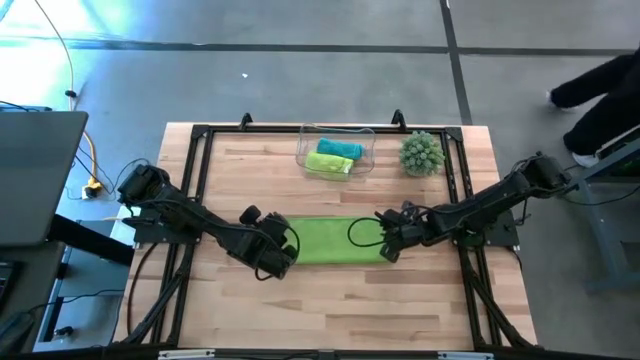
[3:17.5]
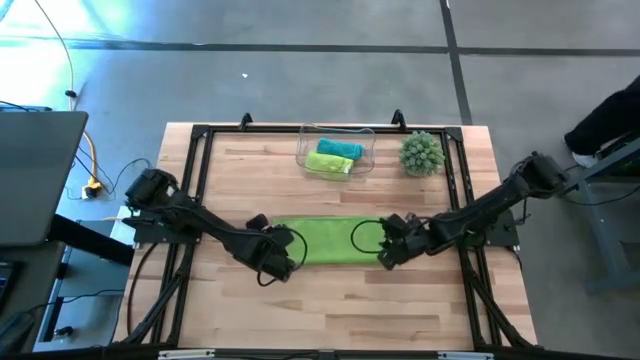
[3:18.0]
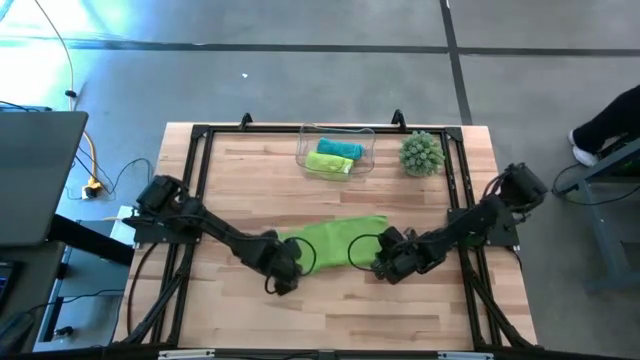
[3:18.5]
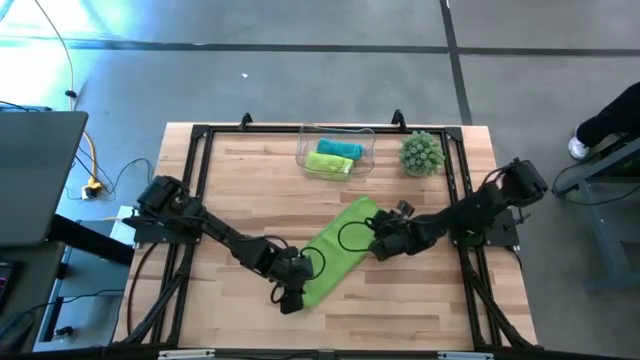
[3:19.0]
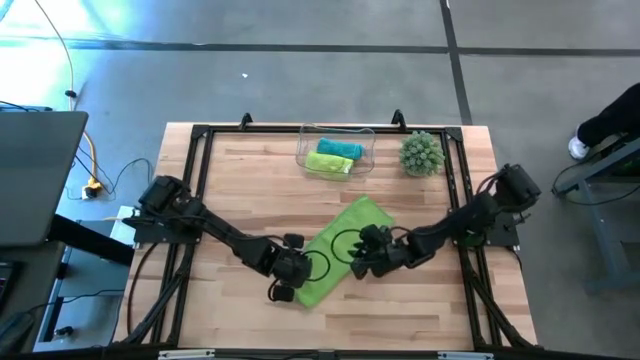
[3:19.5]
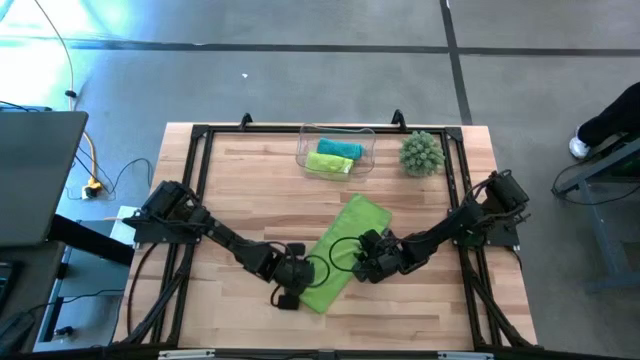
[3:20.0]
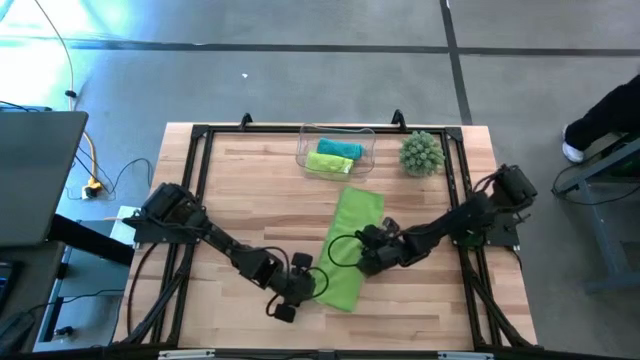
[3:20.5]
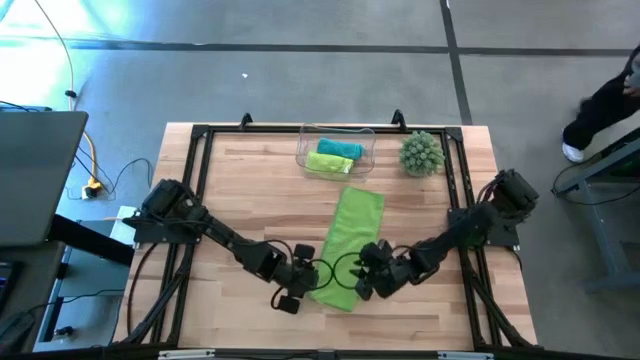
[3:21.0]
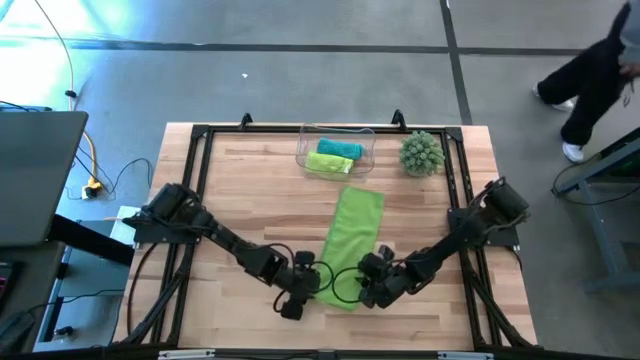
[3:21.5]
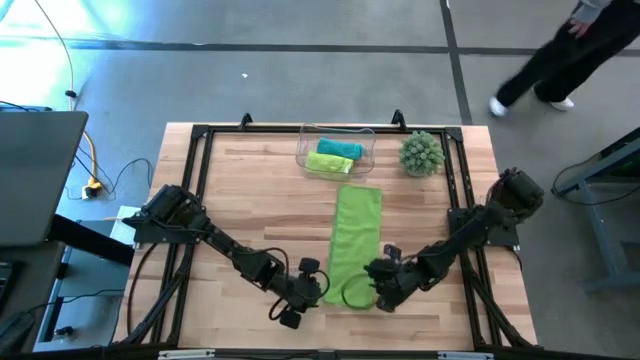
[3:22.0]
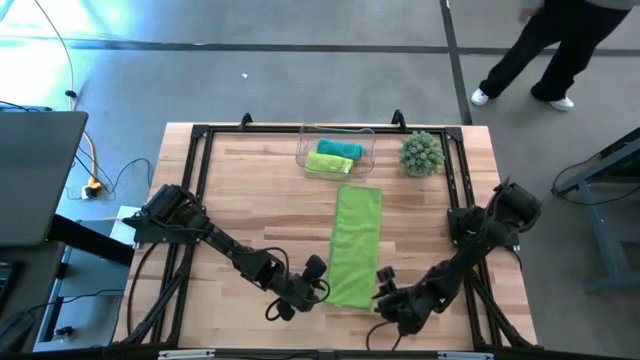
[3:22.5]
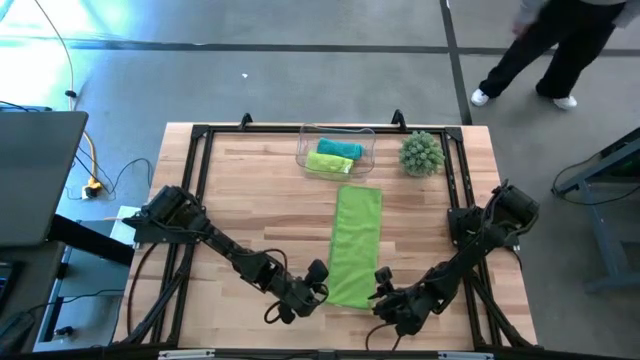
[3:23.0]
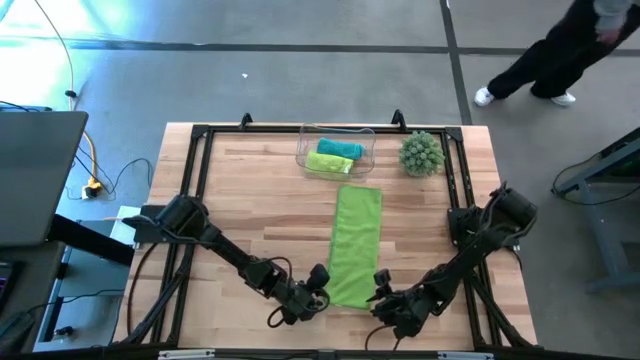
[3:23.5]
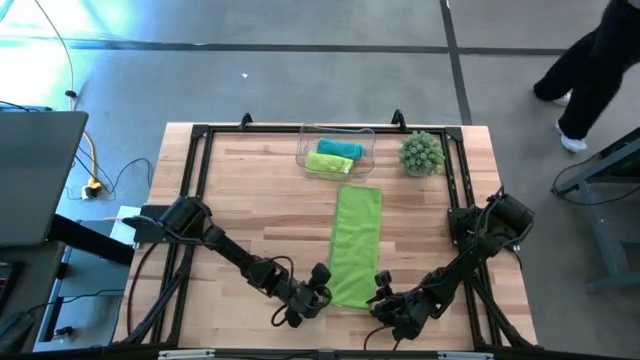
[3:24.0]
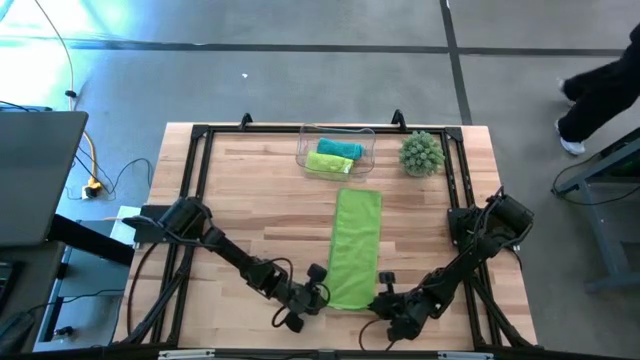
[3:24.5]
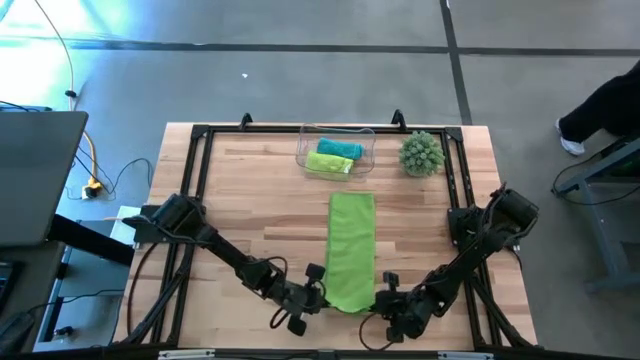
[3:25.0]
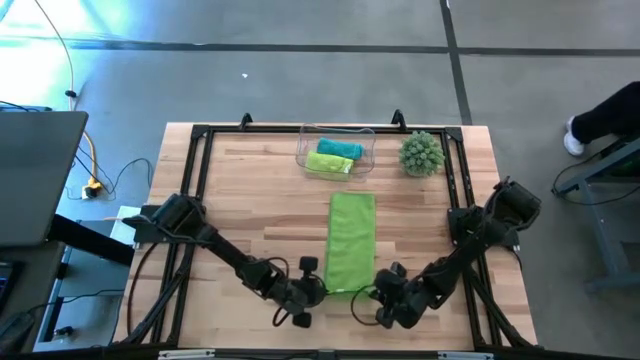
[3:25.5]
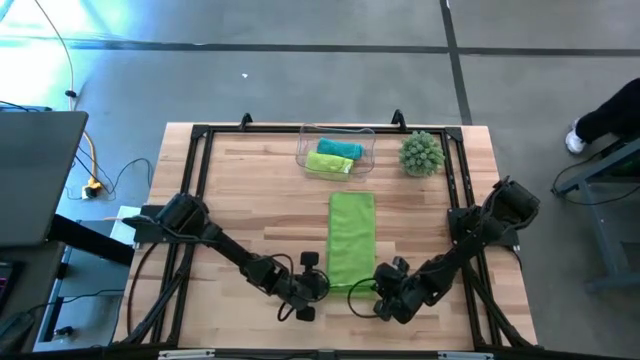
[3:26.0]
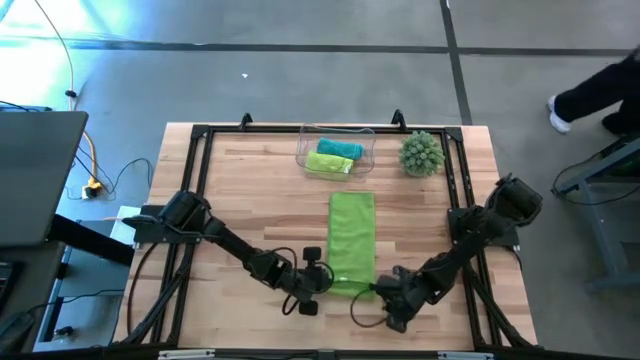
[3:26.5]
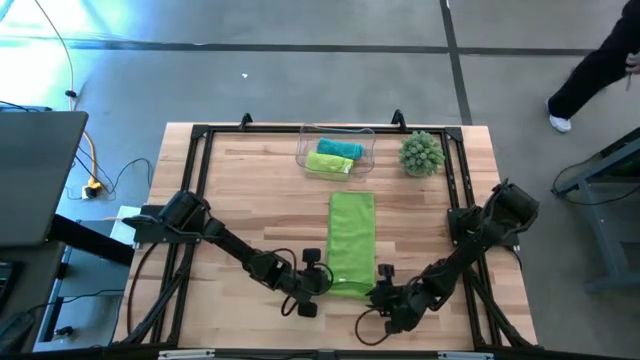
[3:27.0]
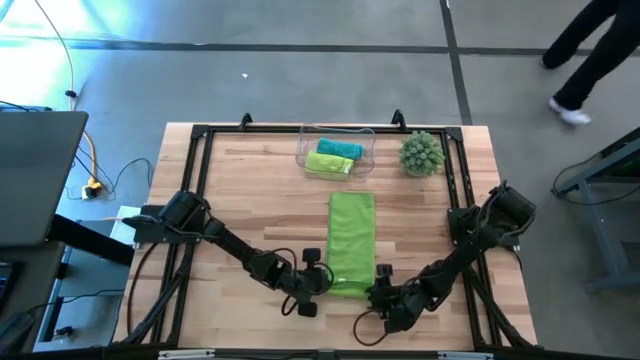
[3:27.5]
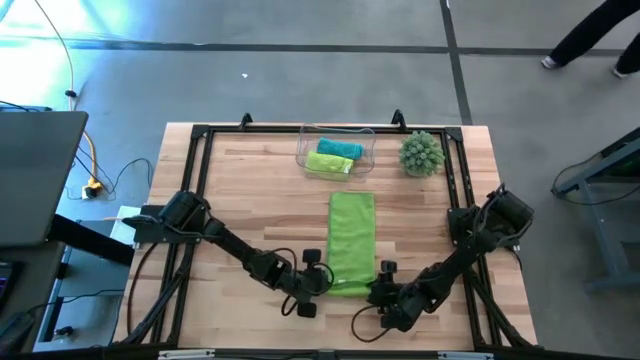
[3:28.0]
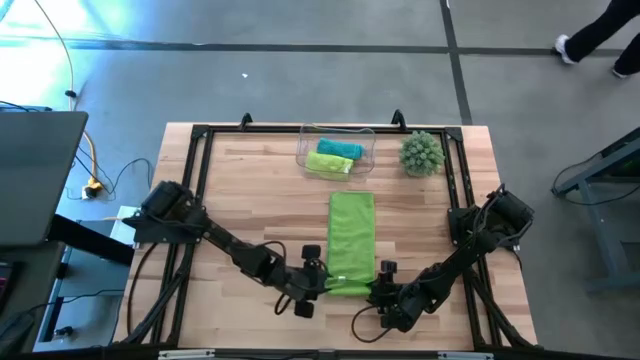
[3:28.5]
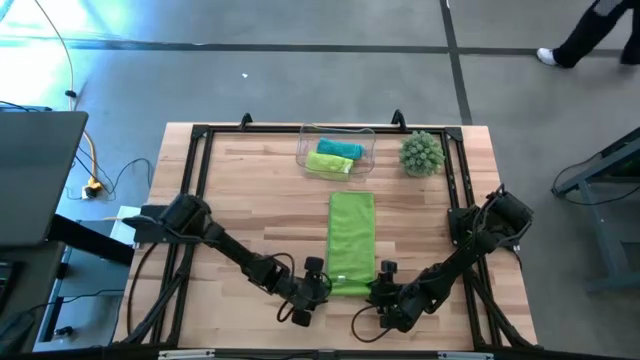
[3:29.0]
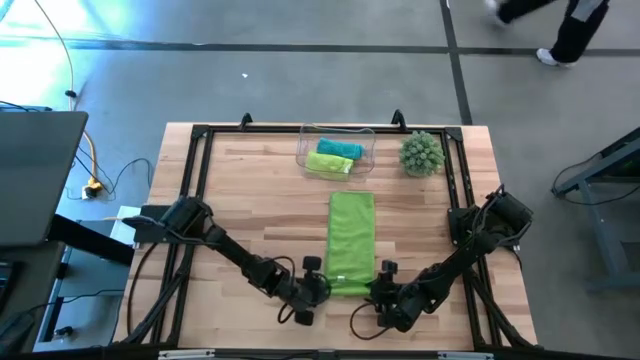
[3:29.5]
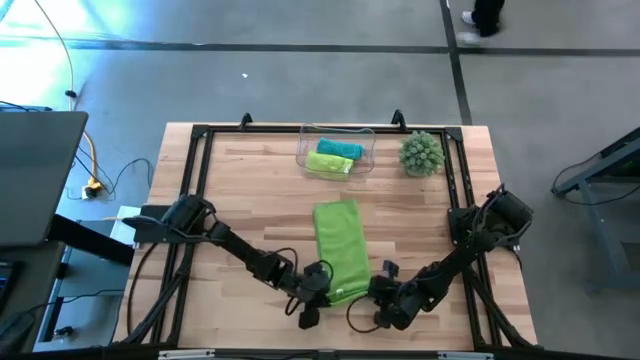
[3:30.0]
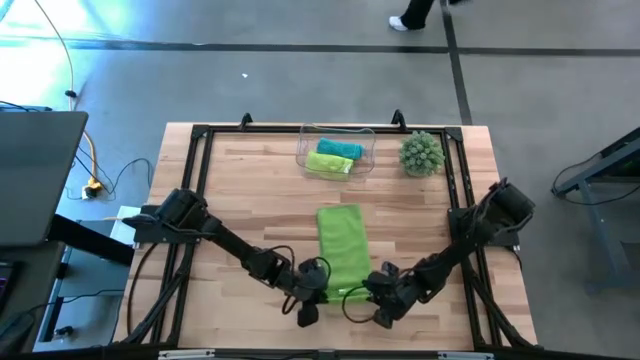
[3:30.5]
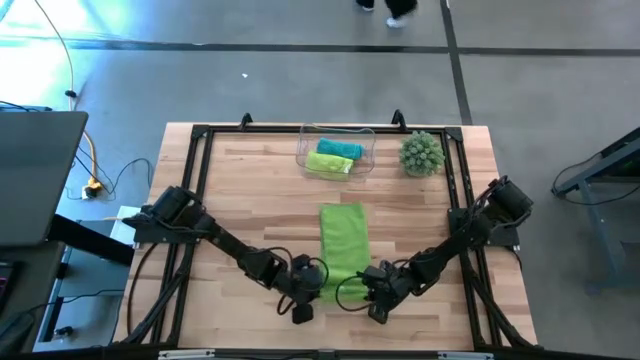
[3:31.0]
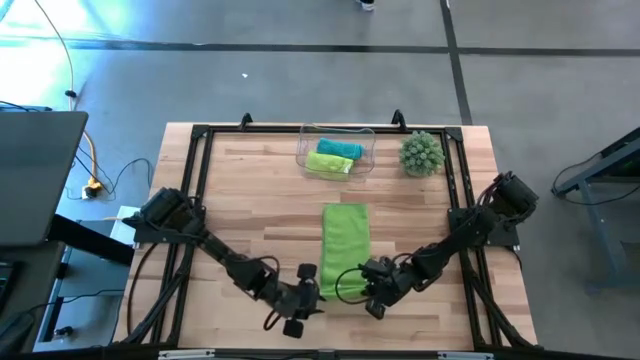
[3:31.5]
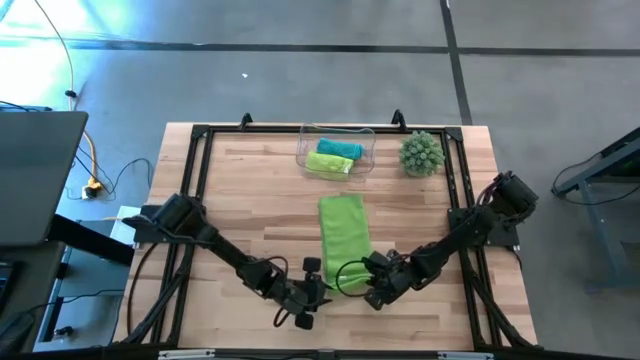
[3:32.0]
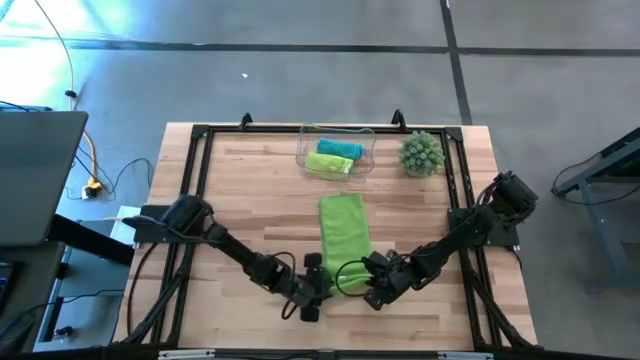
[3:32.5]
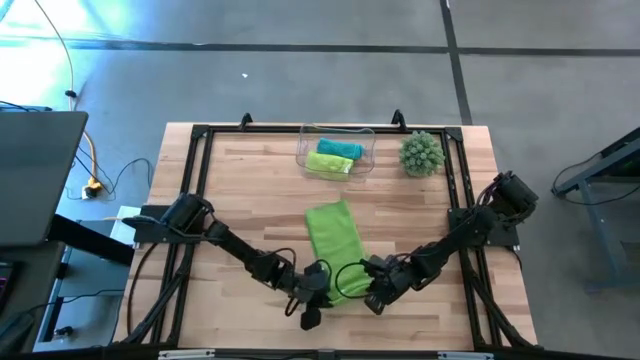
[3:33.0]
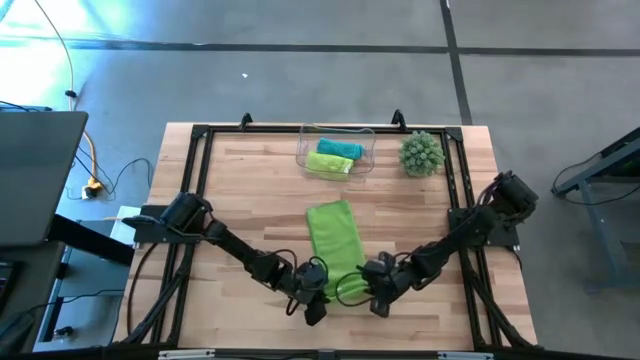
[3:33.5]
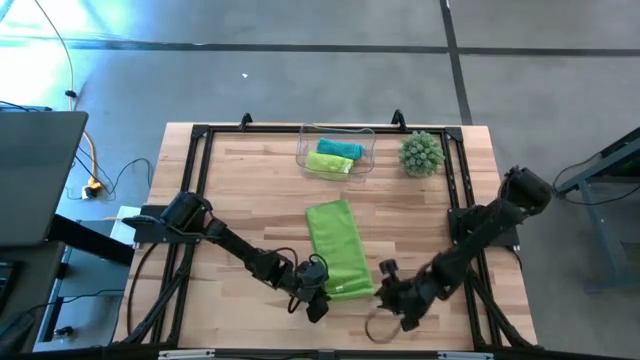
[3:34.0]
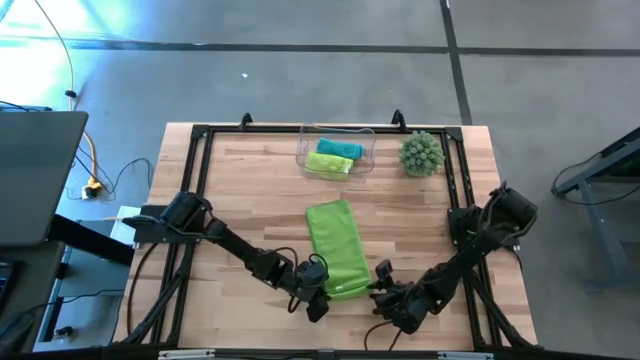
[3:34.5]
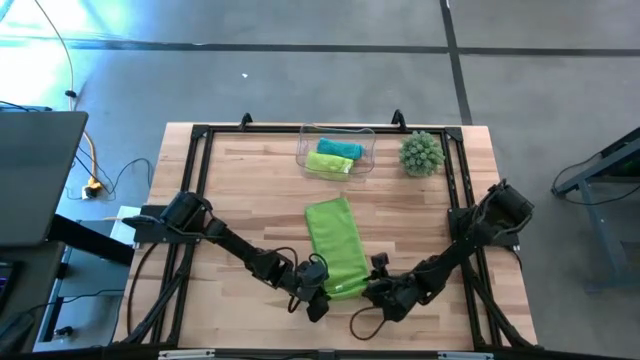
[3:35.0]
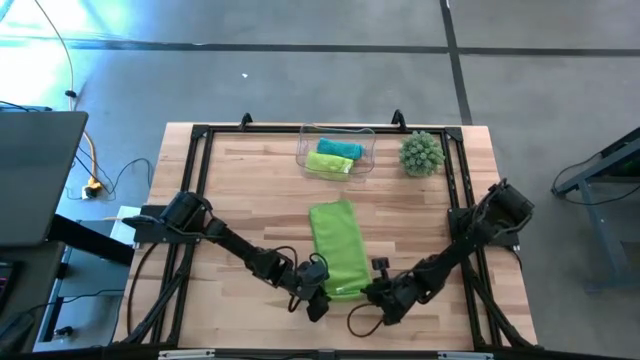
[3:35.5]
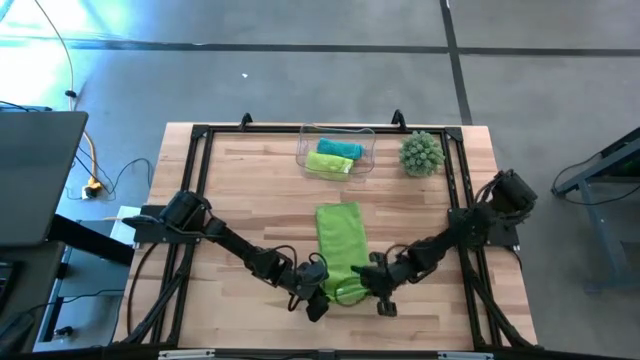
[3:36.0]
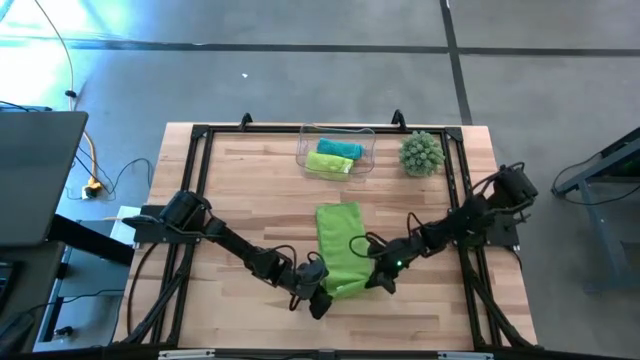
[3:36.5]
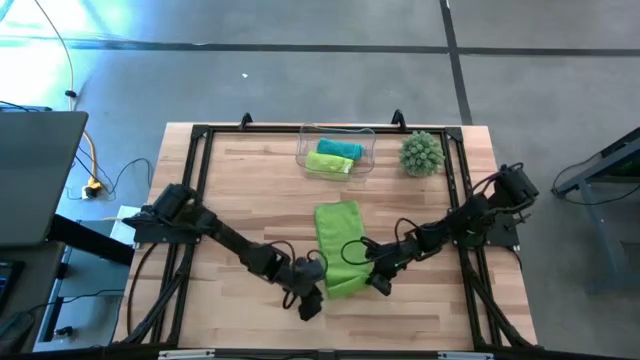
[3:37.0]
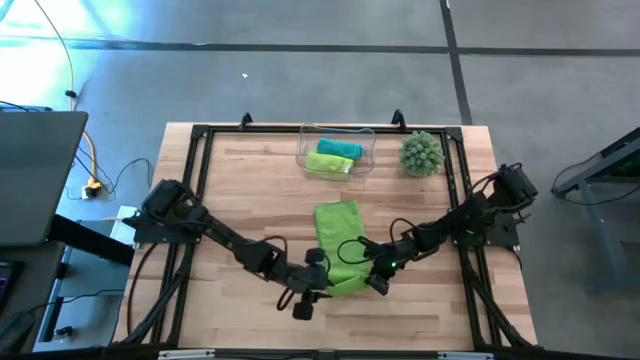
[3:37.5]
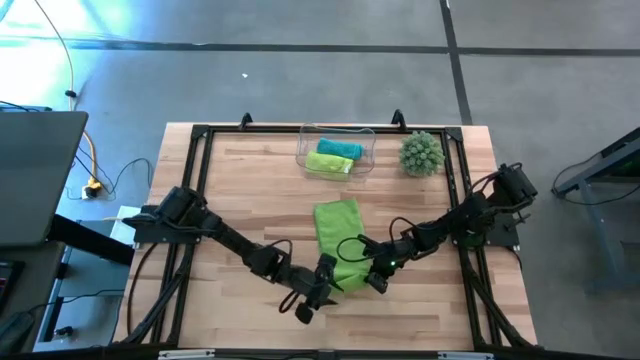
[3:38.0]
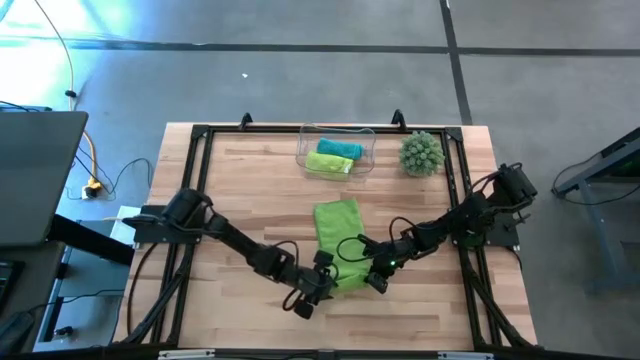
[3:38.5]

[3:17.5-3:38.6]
Task: Roll microfiber towels into tight, uniform cylinder then place into a basket
Roll the green microfiber cloth
